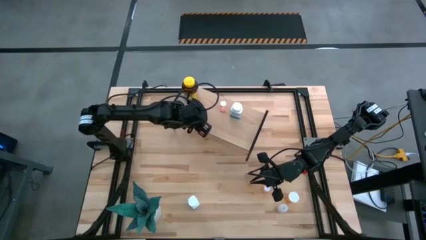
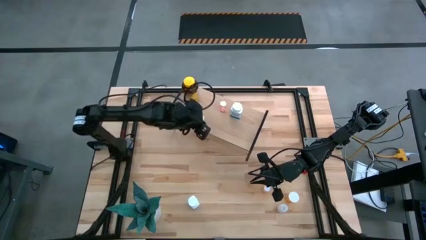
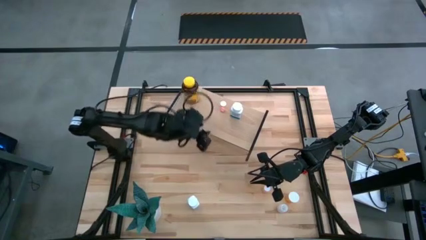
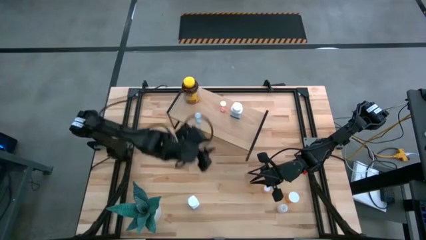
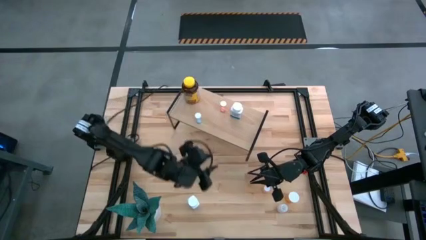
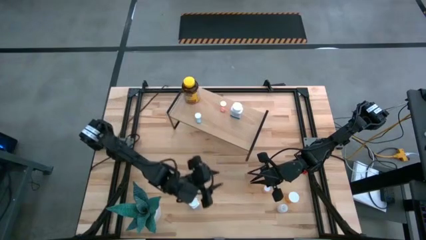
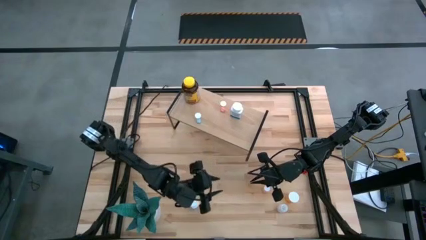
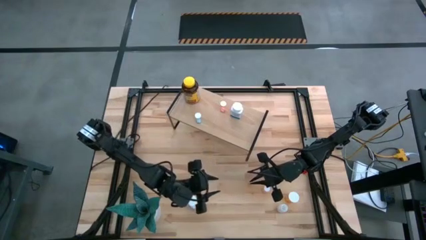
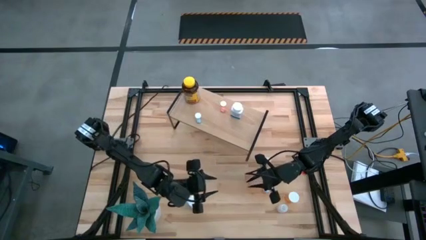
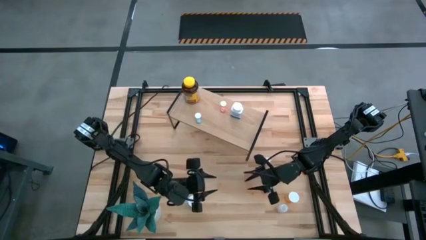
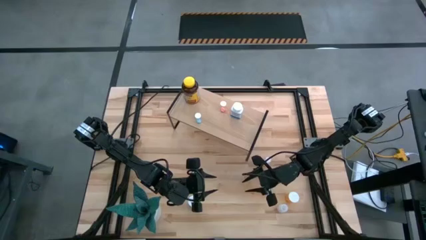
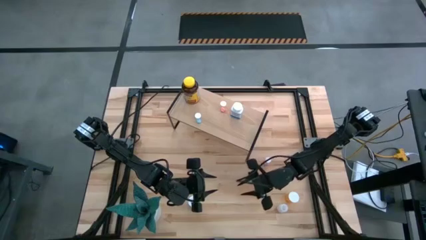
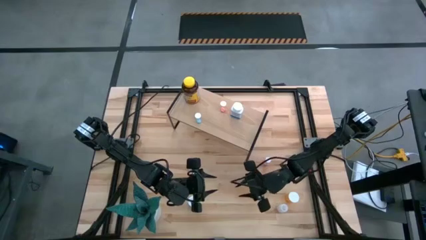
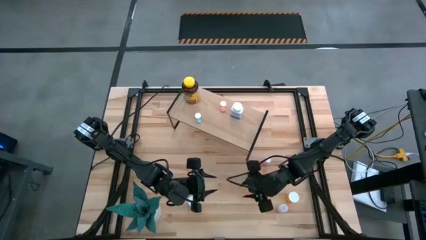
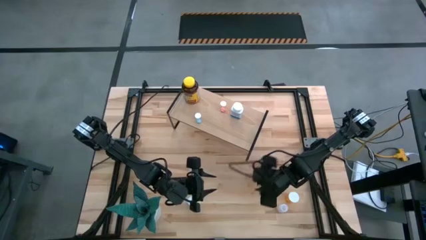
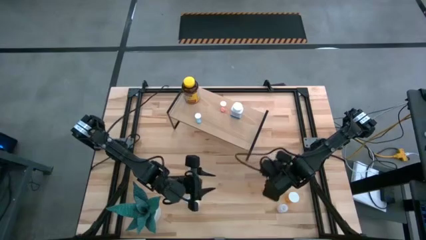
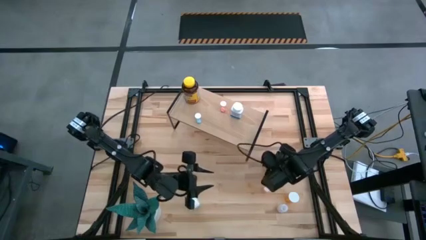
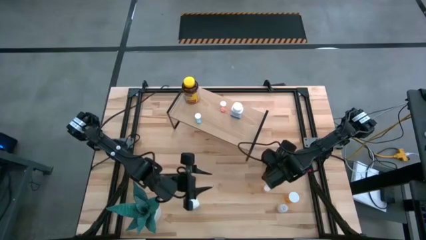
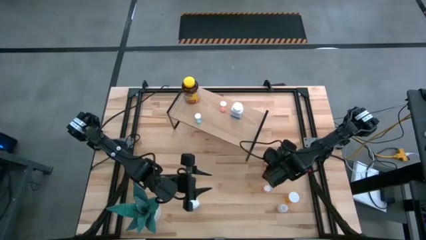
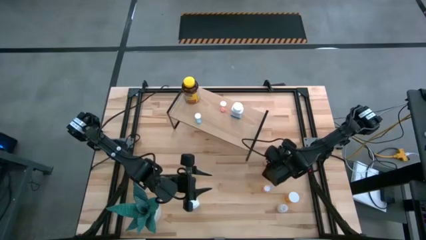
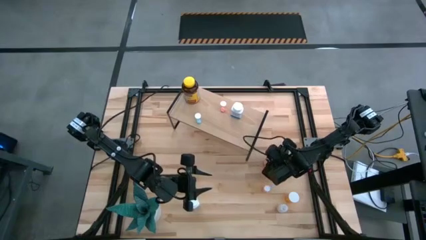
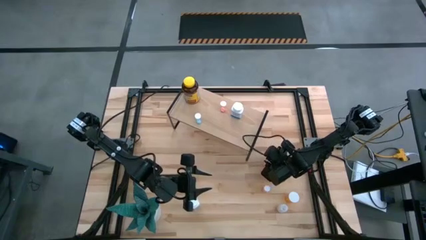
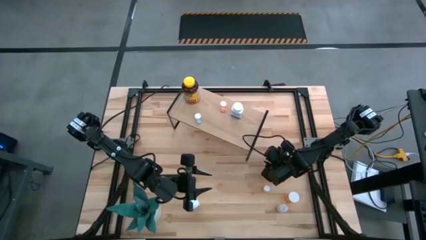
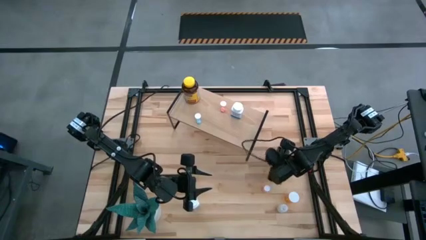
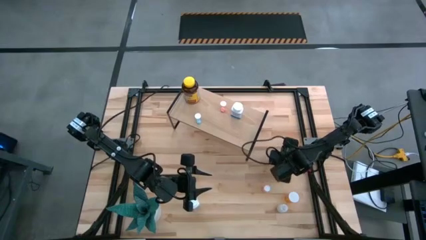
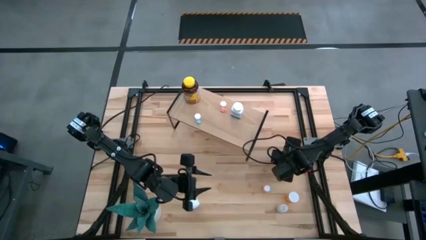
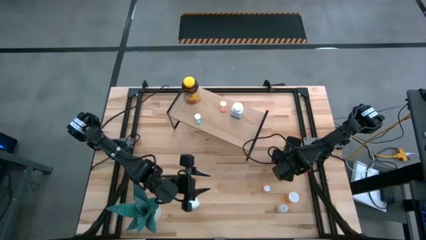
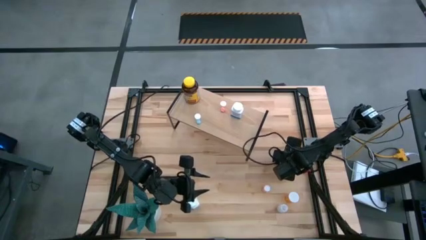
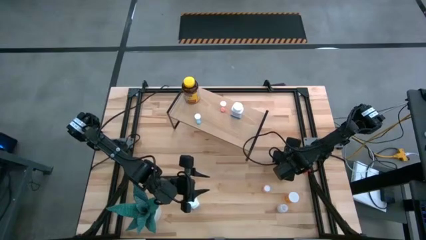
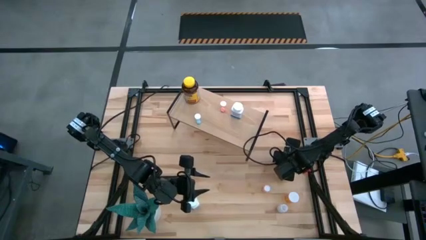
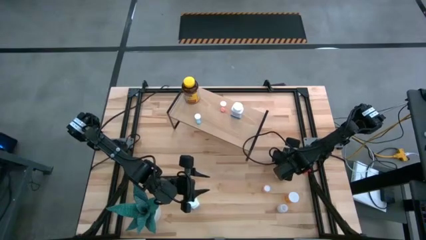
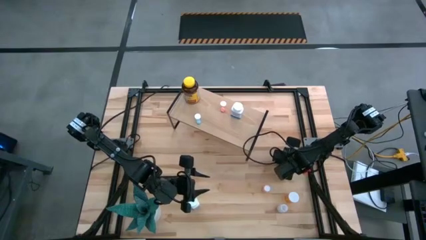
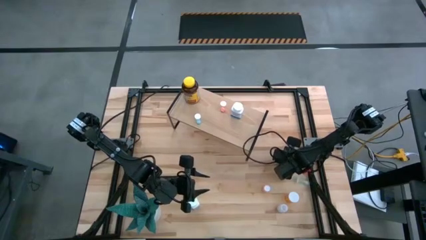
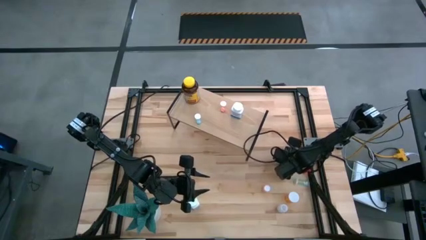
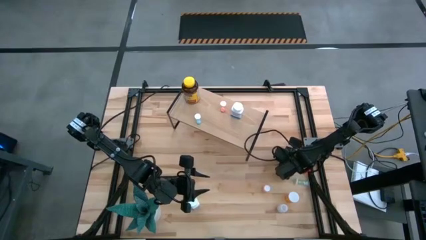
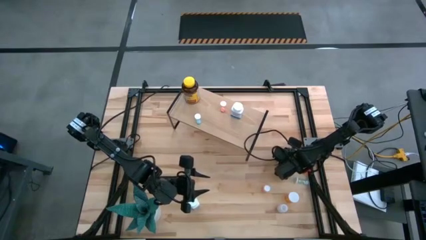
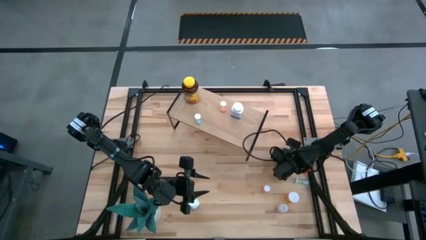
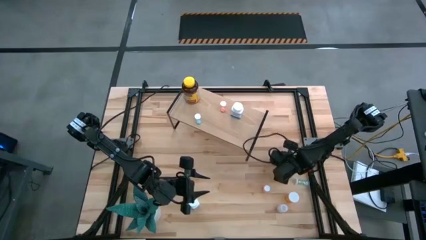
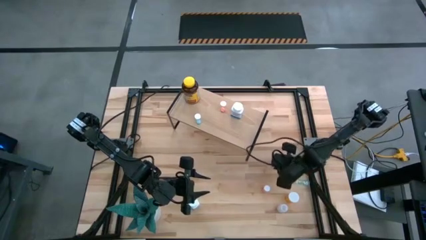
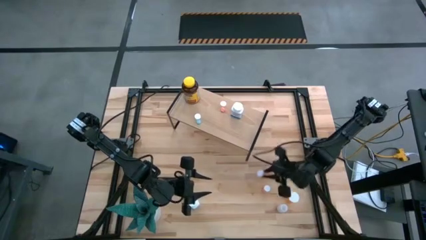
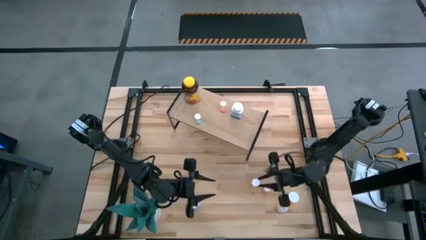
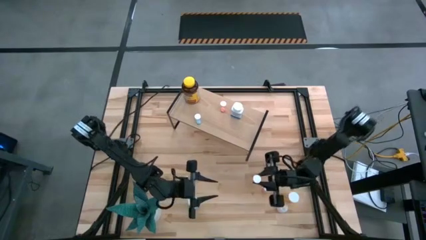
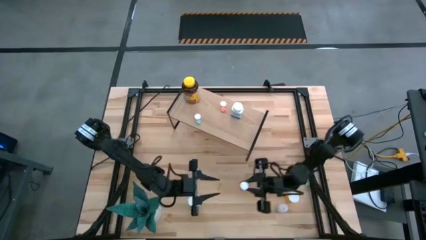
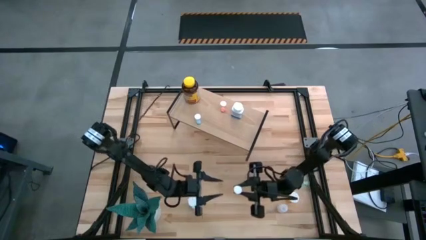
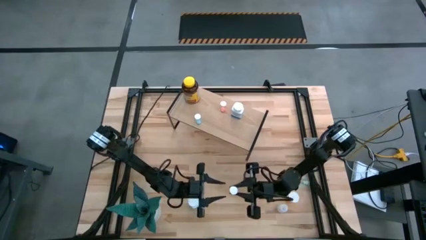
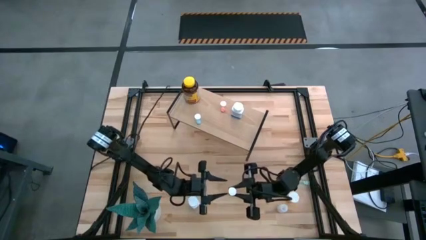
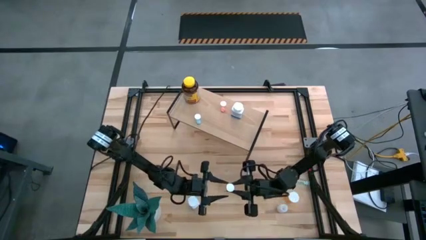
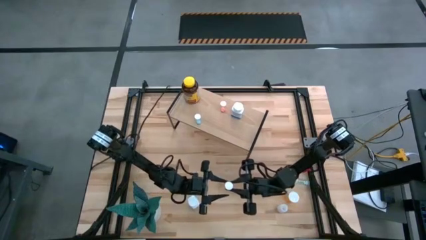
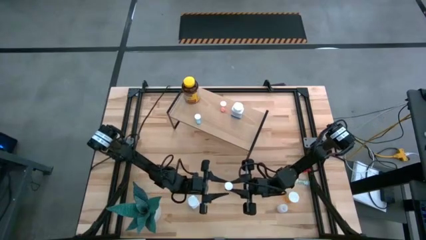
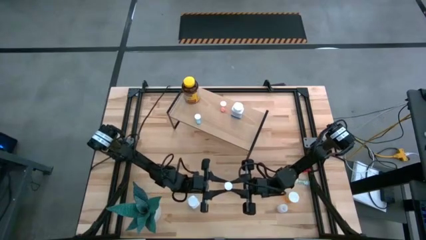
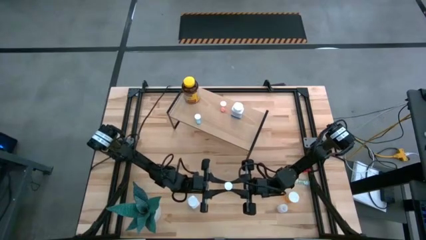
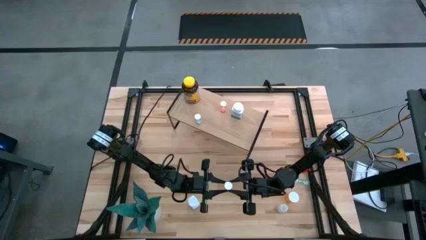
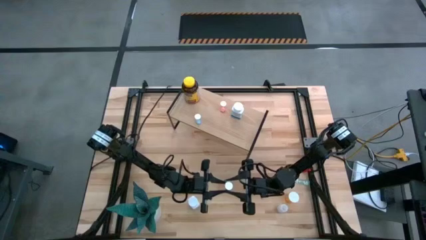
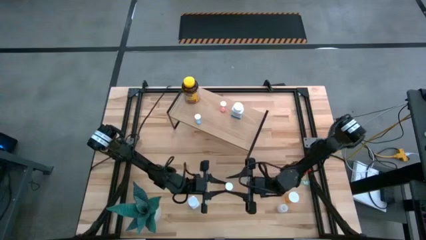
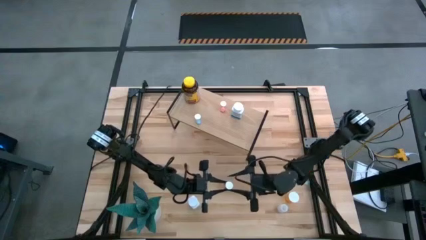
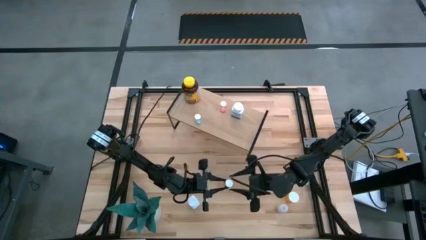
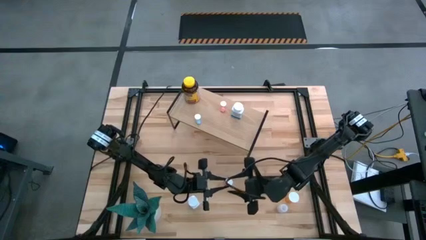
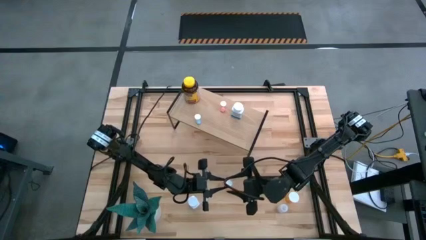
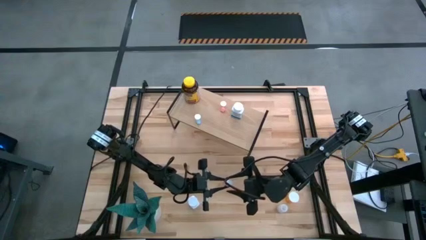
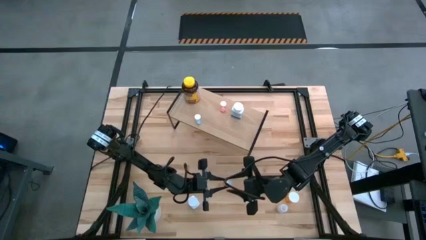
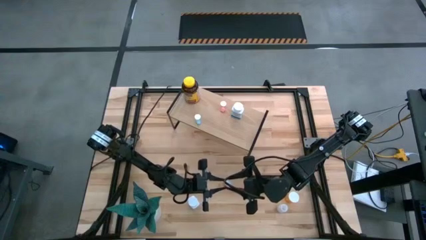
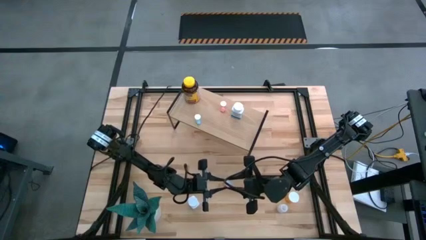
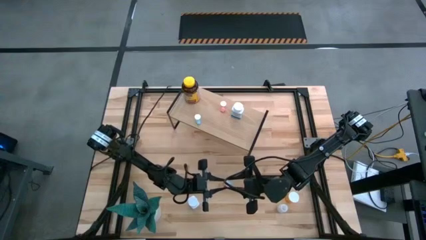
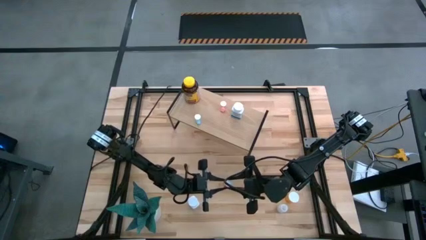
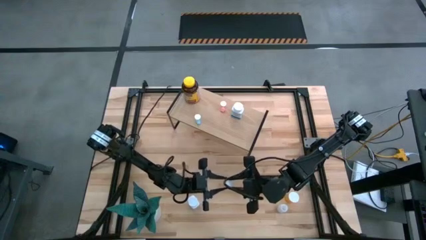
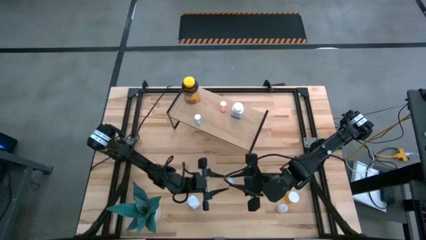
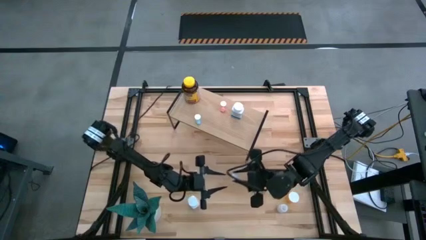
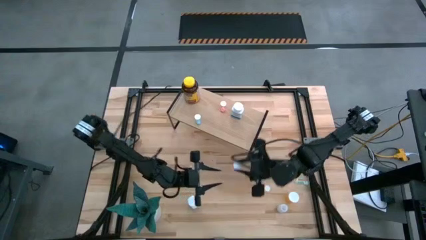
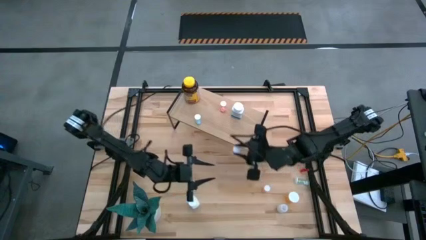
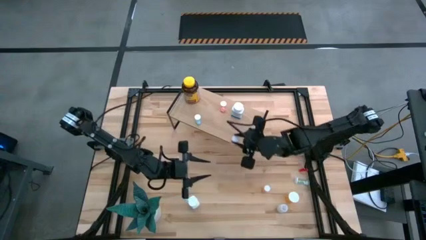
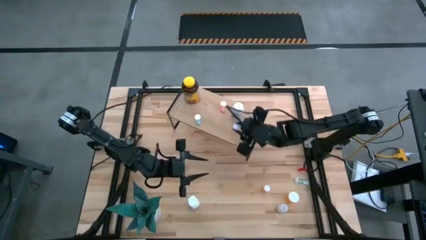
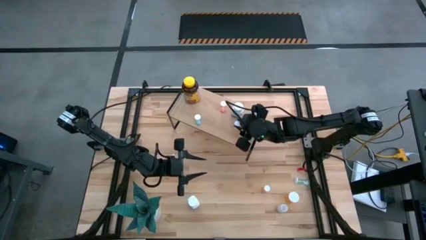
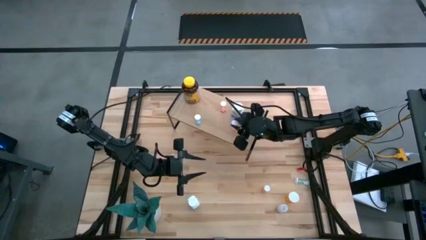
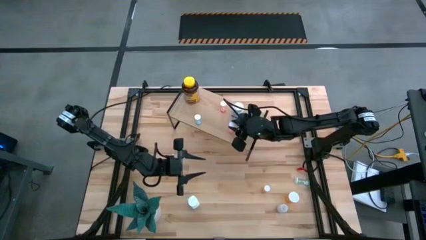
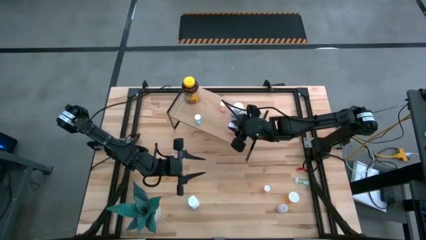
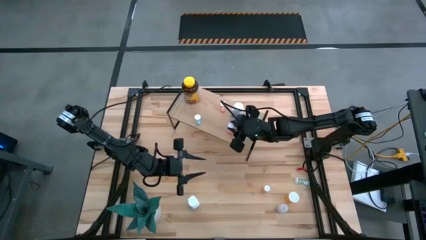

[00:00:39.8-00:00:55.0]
Task: Pick and place medicine bottles onto shelf by color
Put the top red pill bottle on the shelf

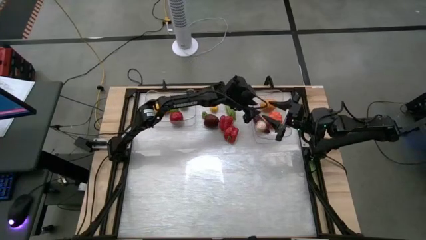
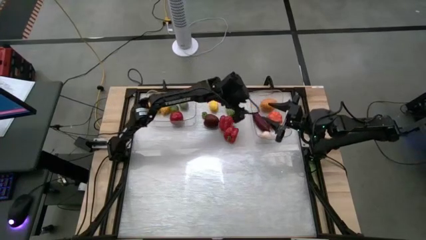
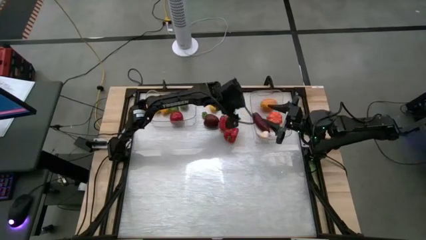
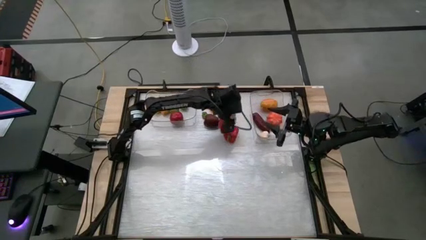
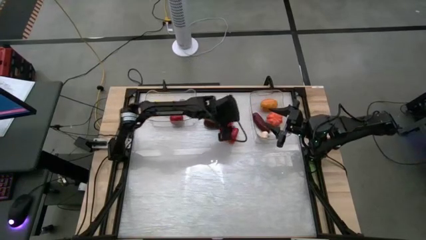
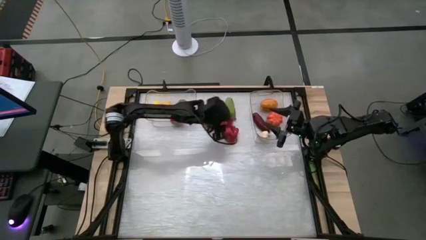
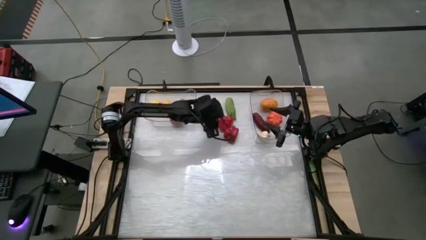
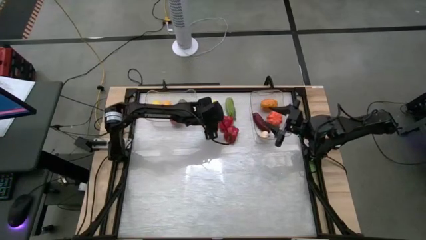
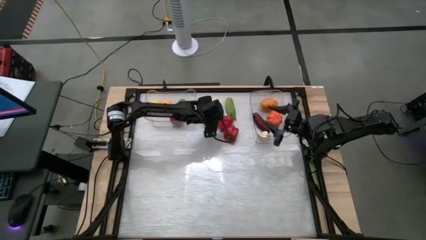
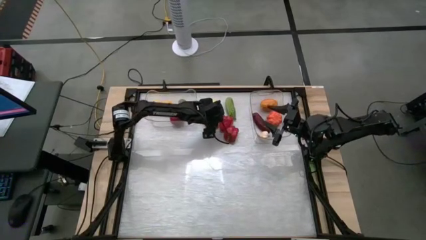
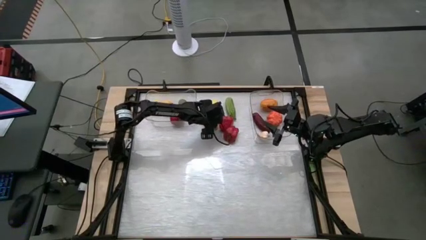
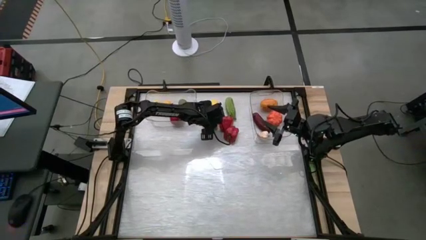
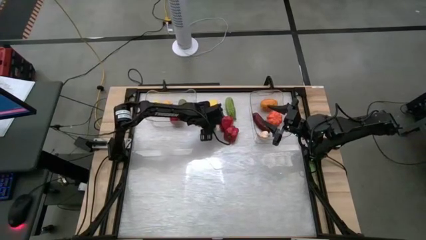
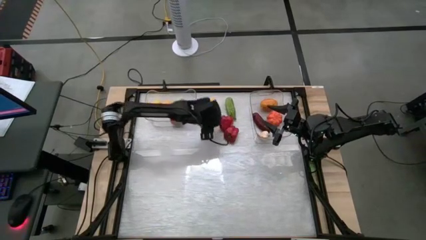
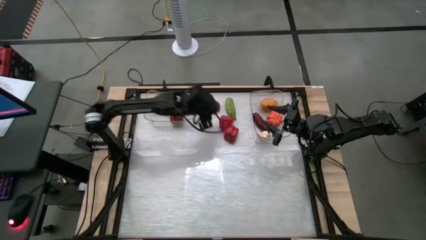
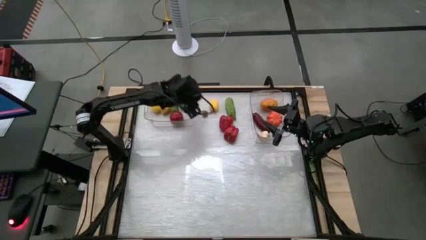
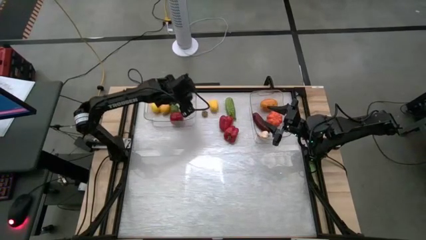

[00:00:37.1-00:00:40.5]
Task: Sort produce into baskets
Put the red apple into the right transparent bin
